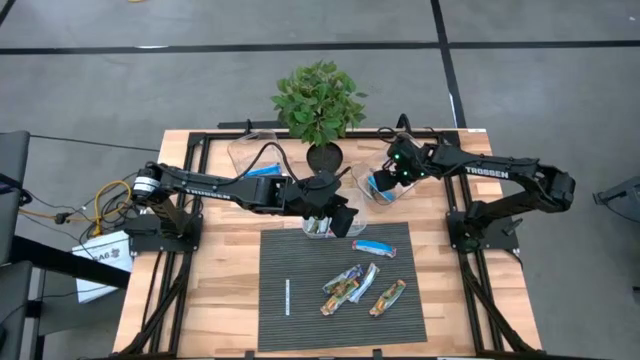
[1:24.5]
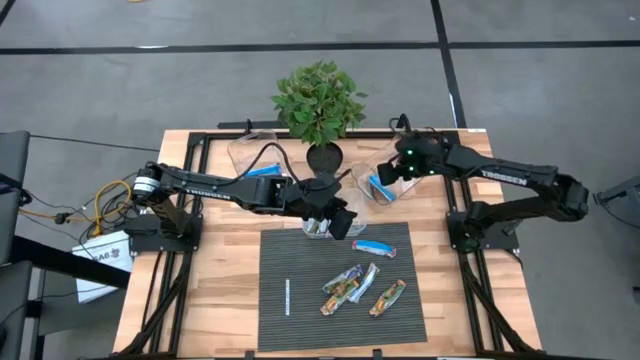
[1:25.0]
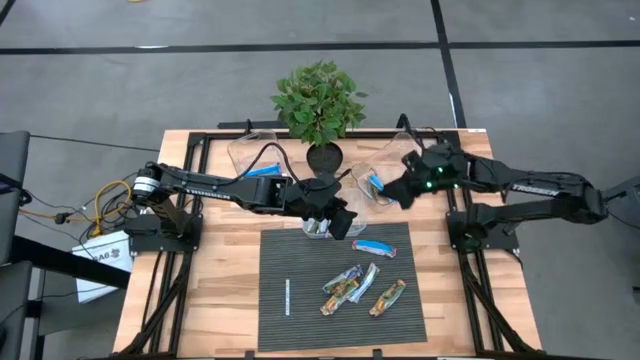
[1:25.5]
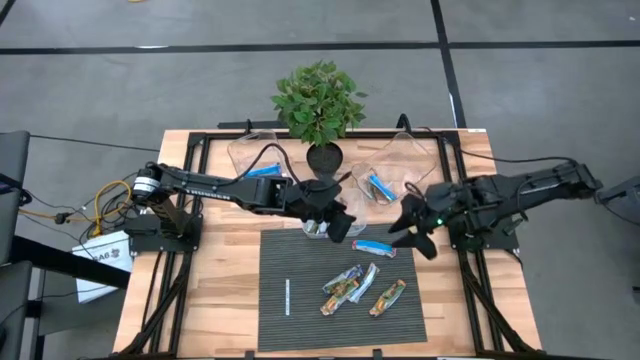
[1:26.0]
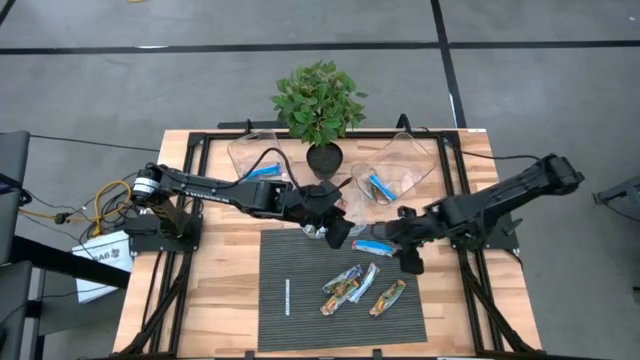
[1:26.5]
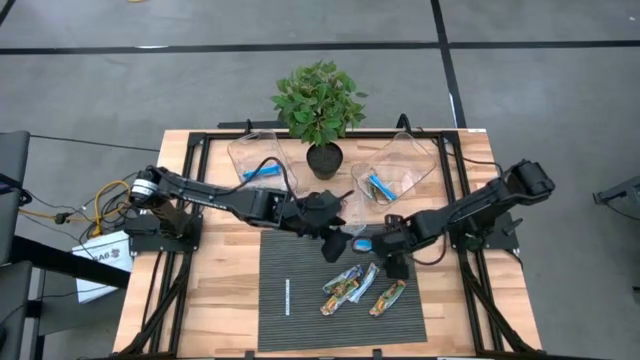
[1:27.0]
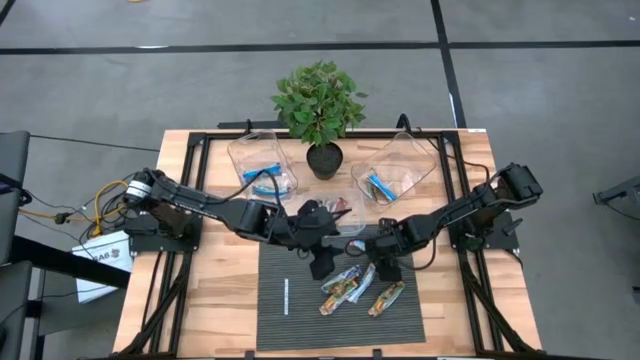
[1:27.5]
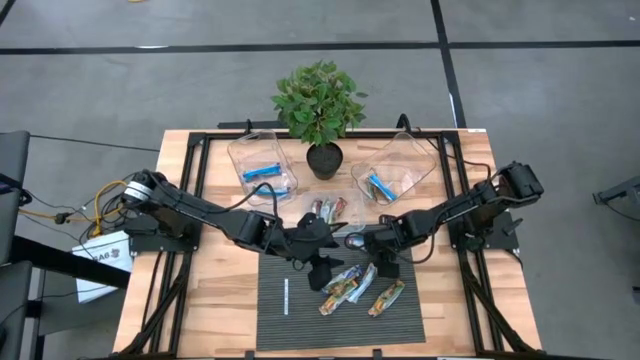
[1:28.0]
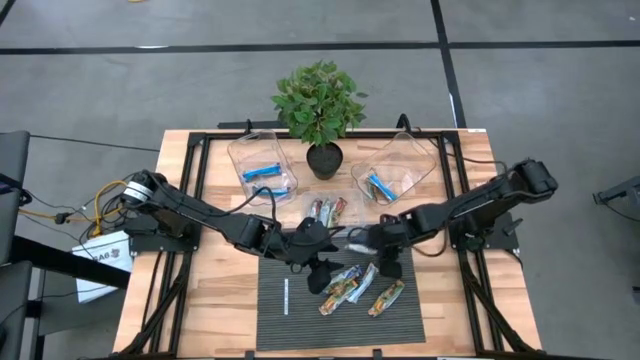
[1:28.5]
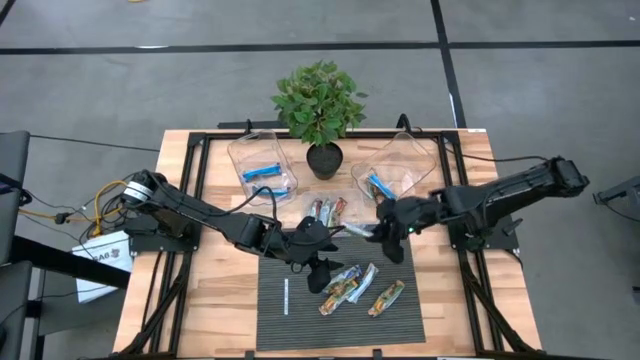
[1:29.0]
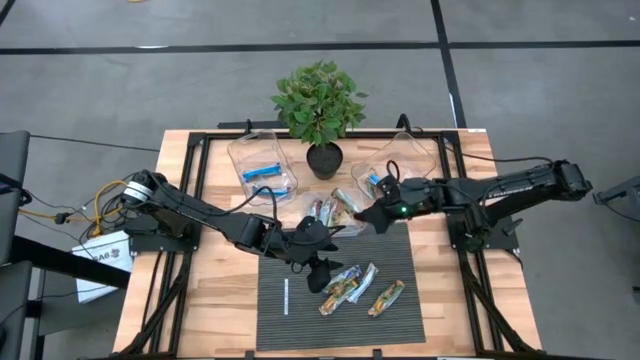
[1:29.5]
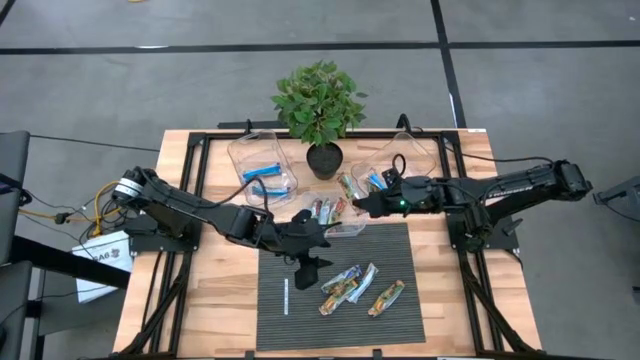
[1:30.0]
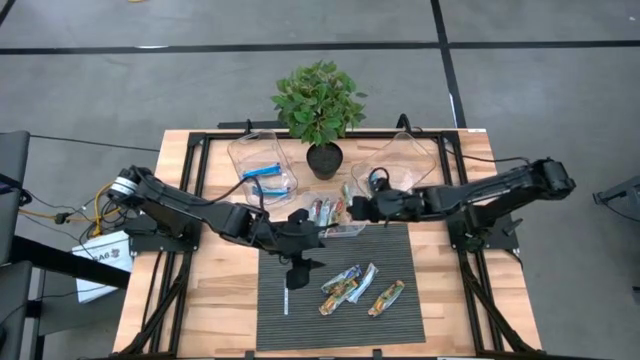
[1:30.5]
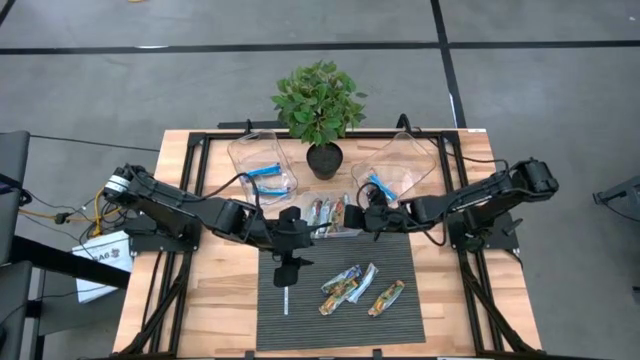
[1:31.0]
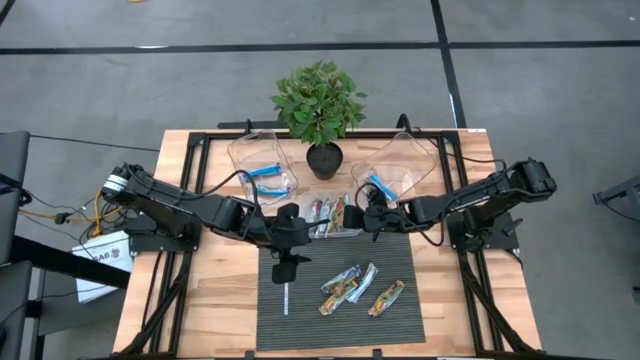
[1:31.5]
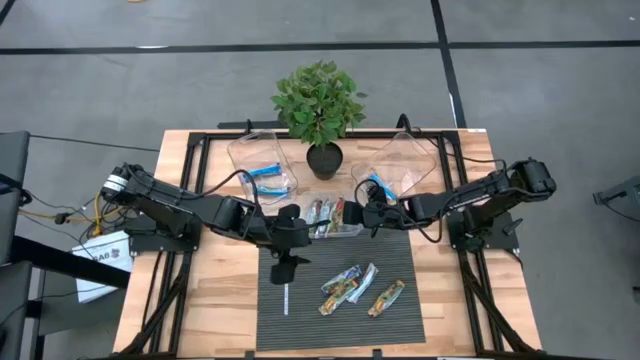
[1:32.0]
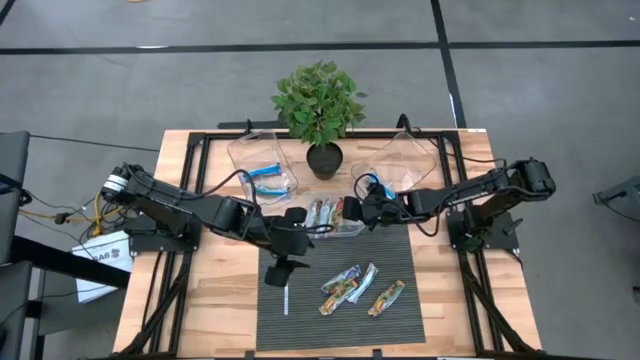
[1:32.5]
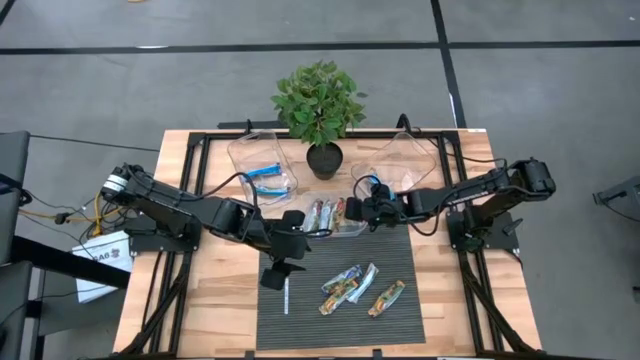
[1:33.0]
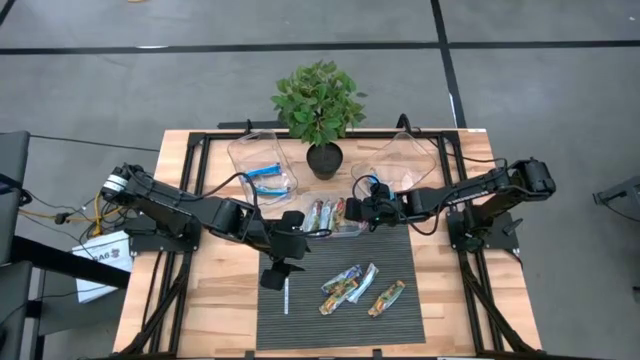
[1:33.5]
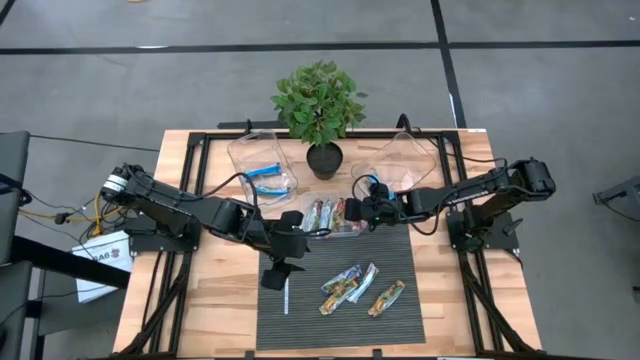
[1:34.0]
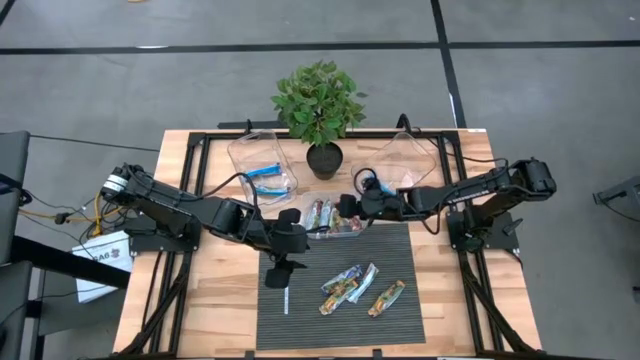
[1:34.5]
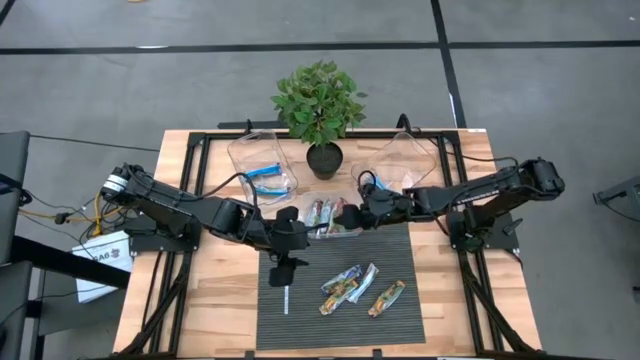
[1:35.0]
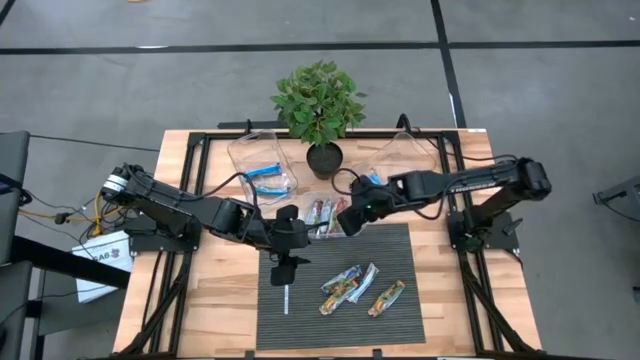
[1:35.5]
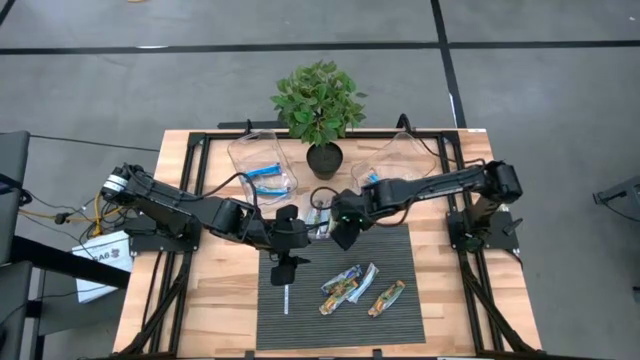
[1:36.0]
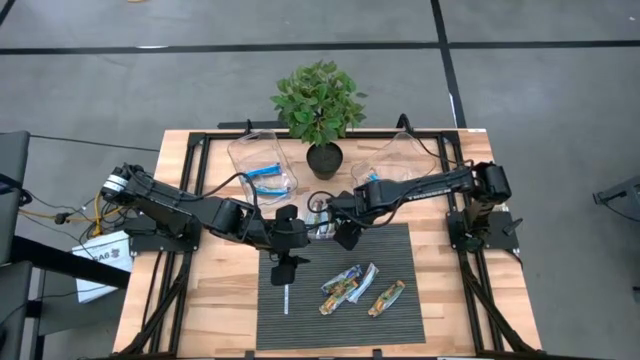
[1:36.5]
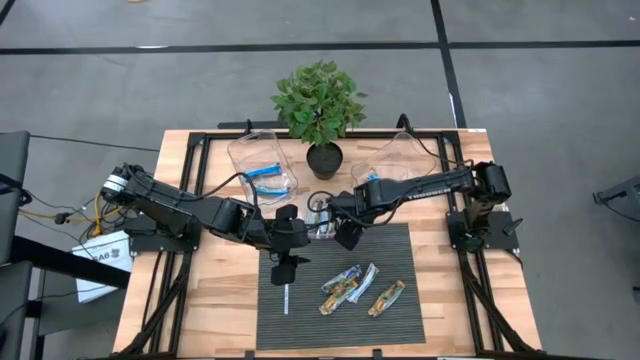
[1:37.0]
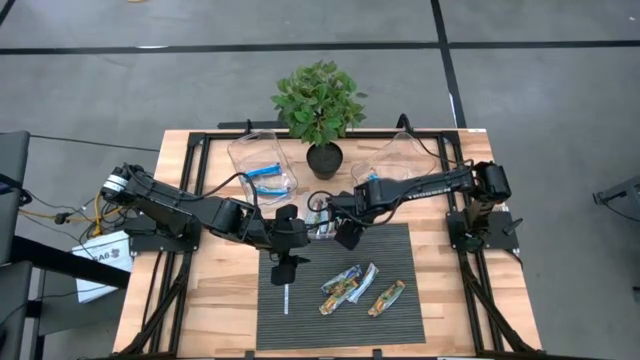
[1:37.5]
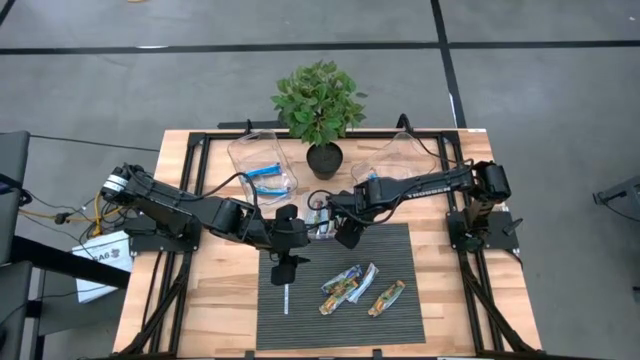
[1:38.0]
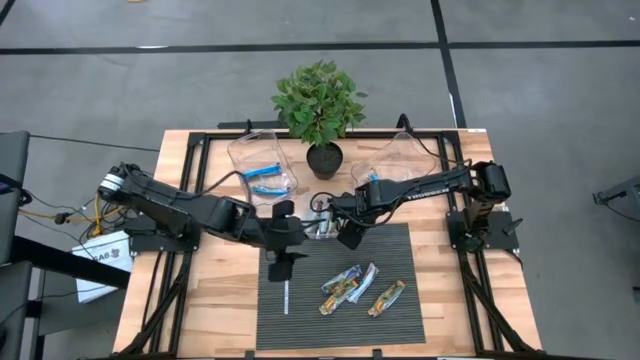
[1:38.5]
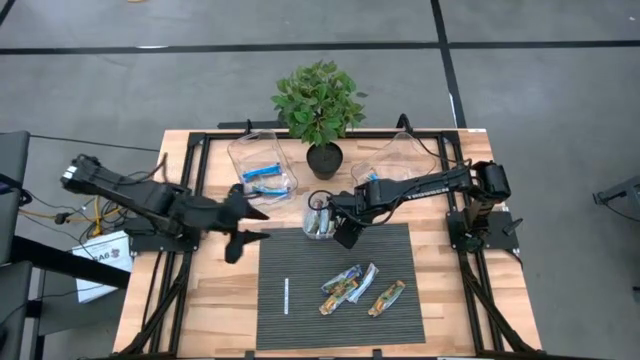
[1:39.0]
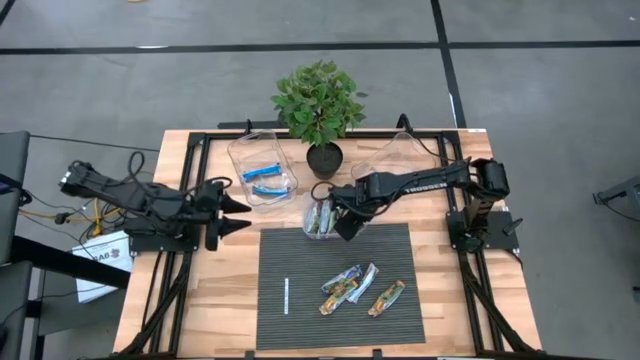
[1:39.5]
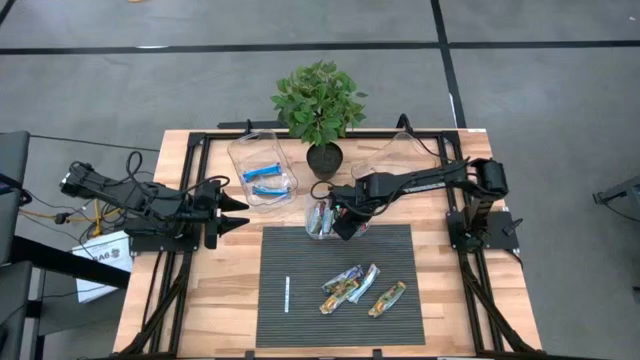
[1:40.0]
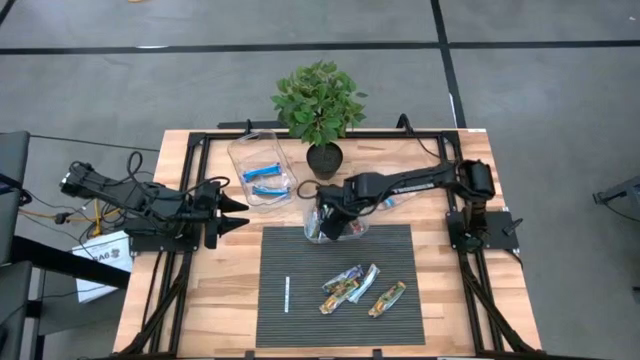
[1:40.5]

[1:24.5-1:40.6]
Task: Pick and place Granola Bars by type
Put the red granola bar into the center transparent bin

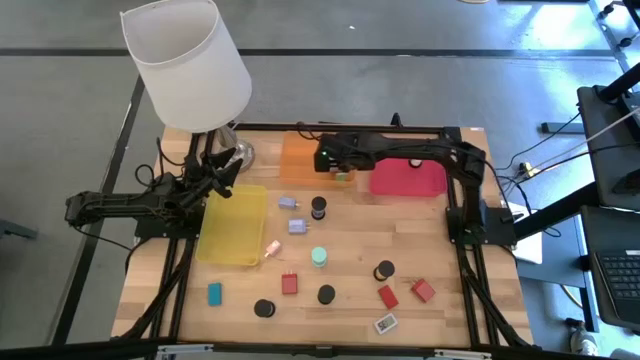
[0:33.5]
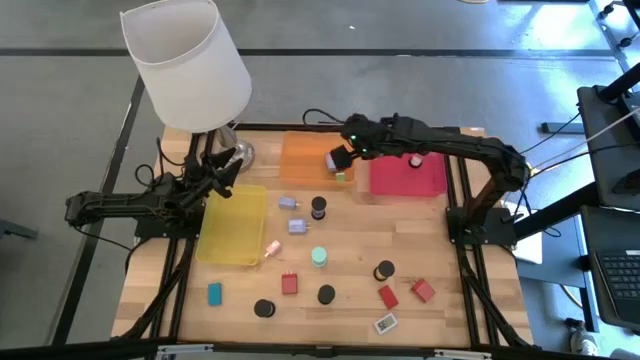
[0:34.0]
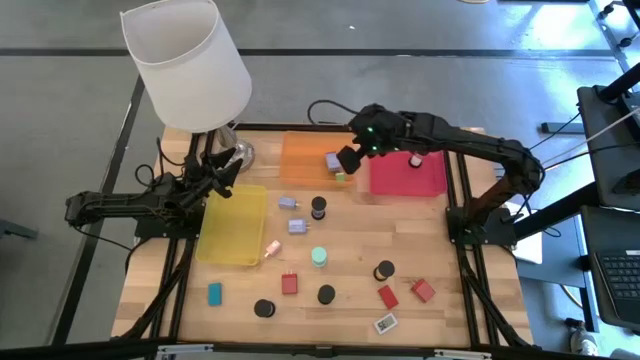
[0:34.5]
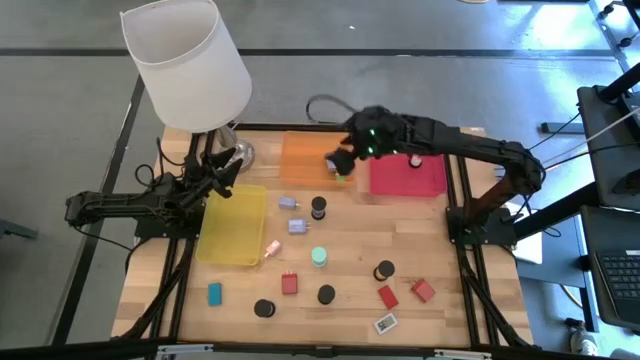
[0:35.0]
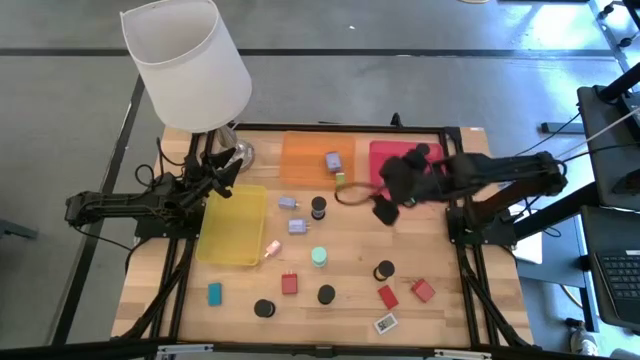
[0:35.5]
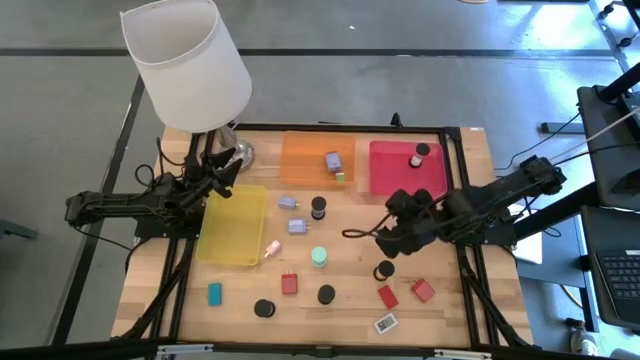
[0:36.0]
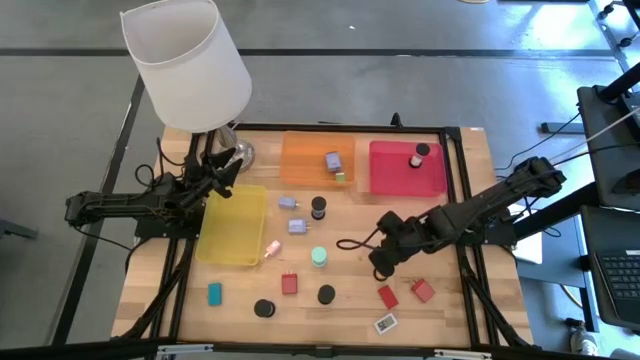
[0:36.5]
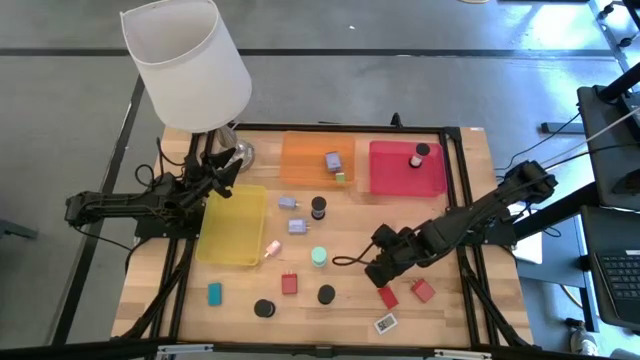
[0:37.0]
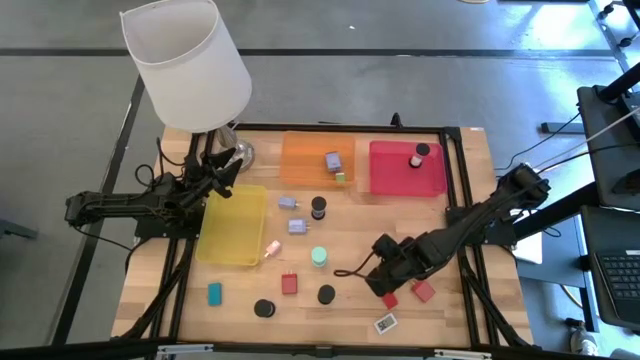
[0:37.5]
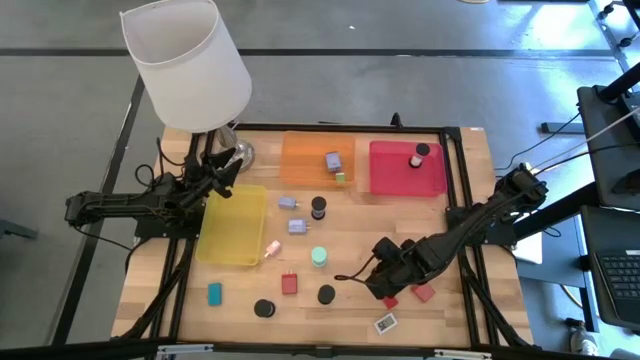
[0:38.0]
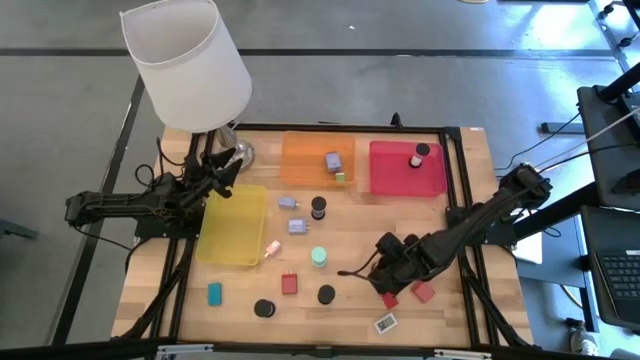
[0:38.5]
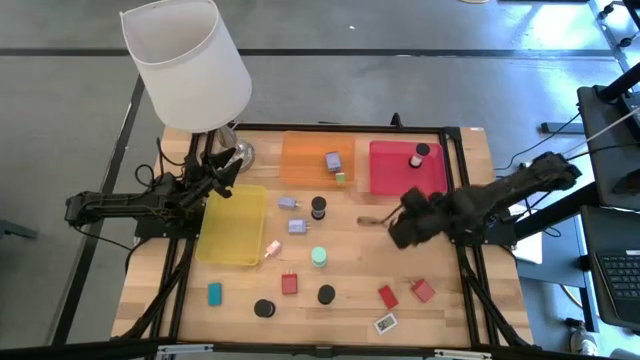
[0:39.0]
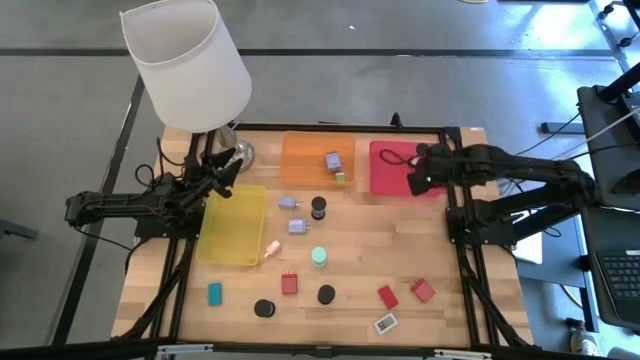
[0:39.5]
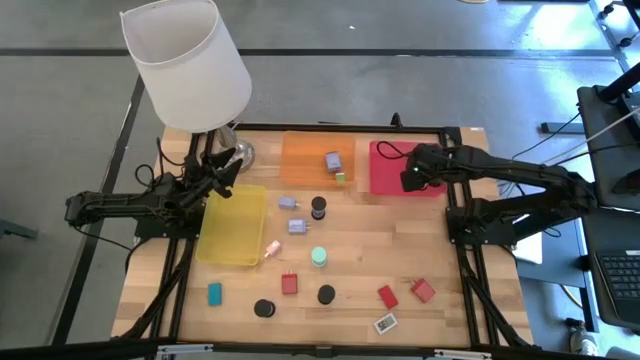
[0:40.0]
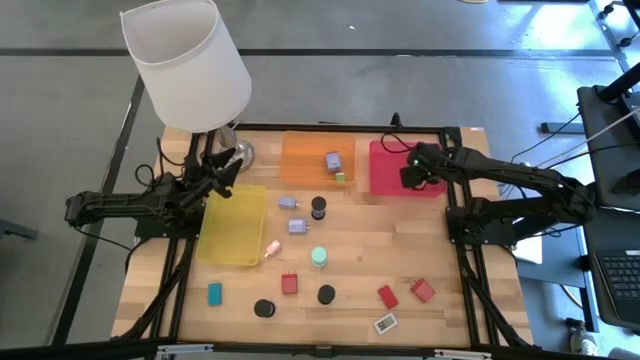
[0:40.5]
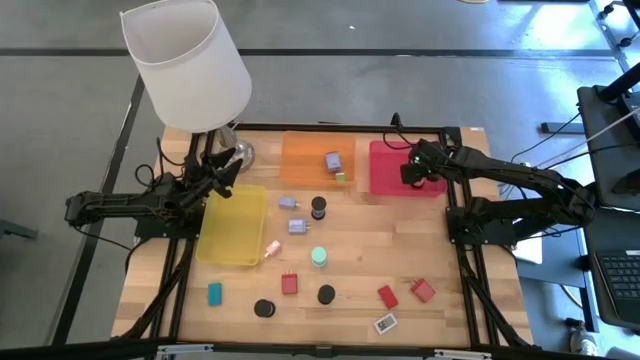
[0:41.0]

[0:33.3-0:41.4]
Task: Pick & Place Office items
Put the orange hourglass into the pink bin
